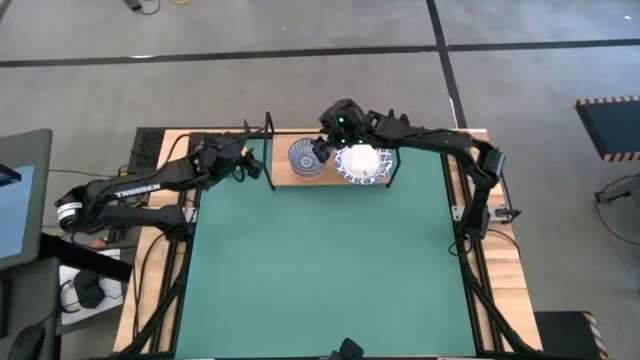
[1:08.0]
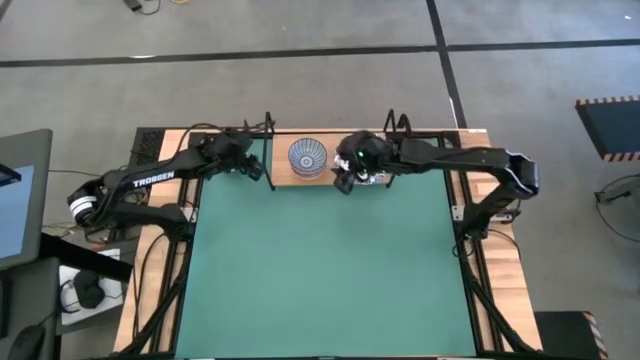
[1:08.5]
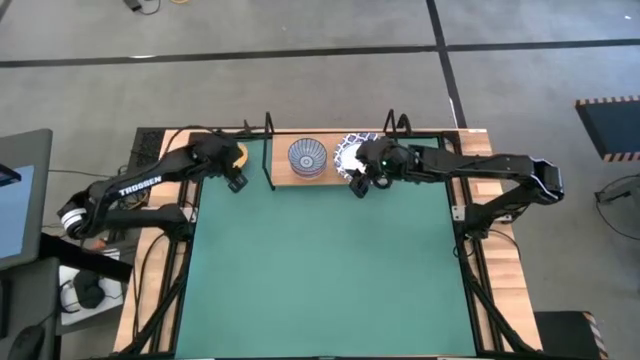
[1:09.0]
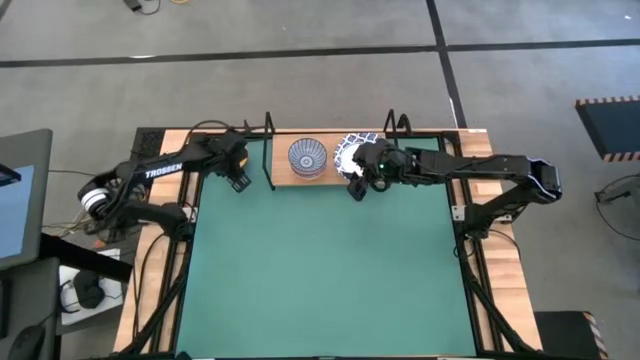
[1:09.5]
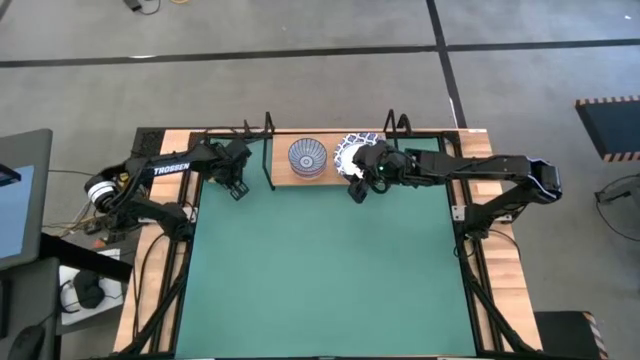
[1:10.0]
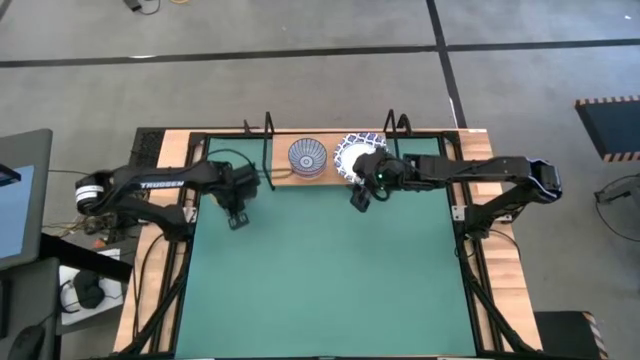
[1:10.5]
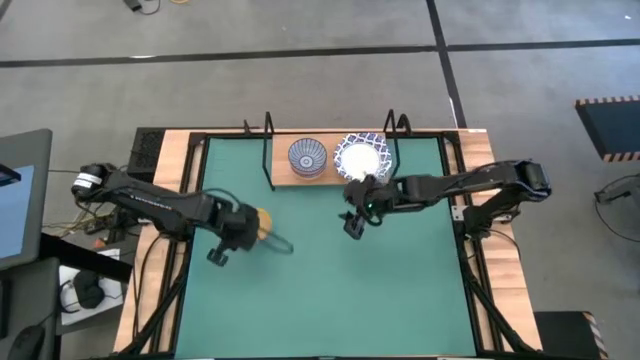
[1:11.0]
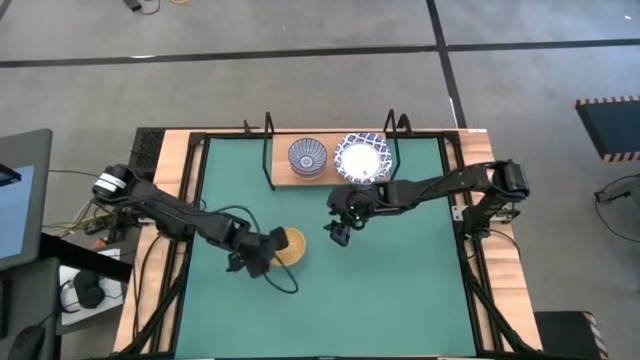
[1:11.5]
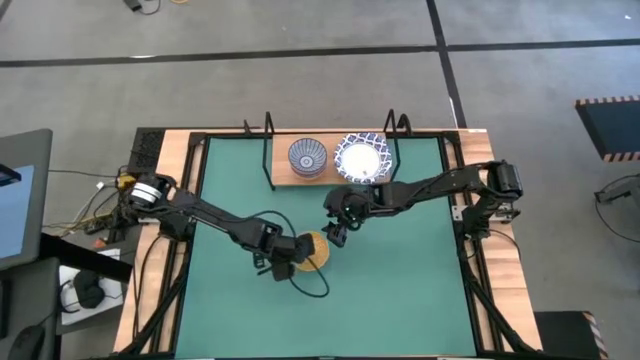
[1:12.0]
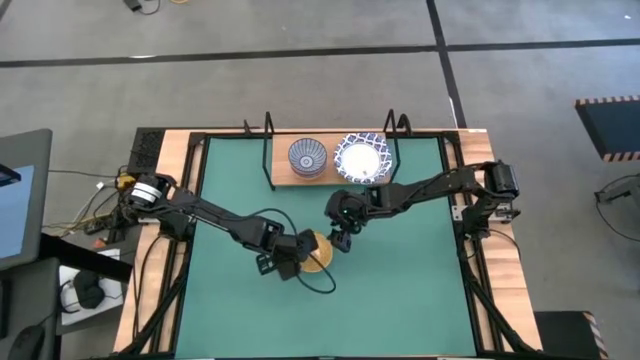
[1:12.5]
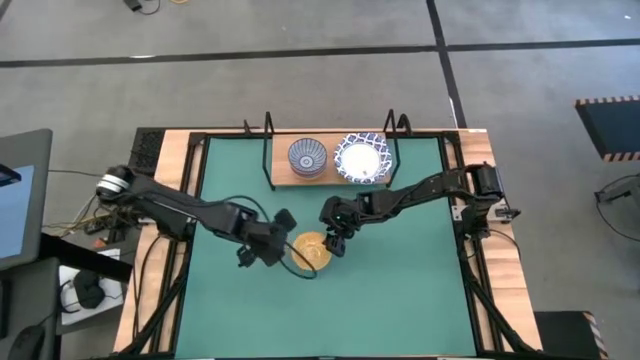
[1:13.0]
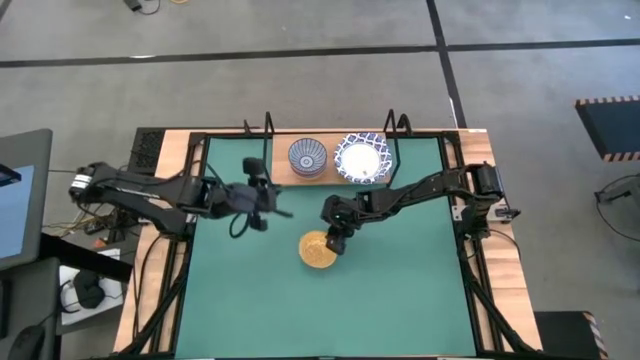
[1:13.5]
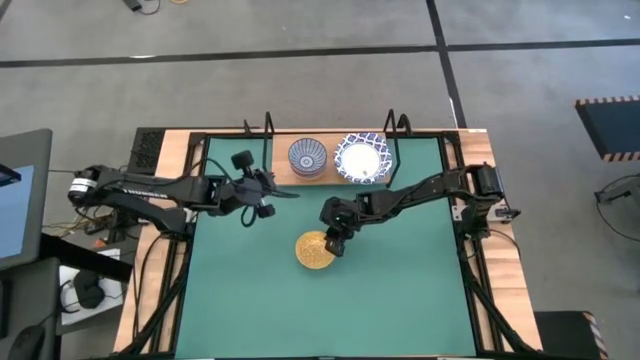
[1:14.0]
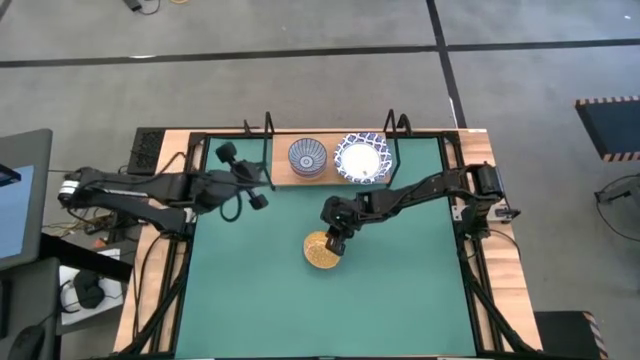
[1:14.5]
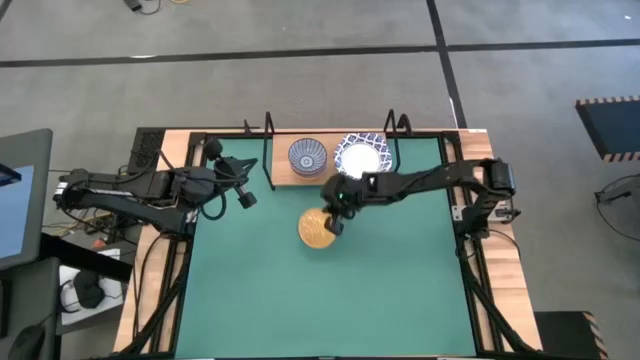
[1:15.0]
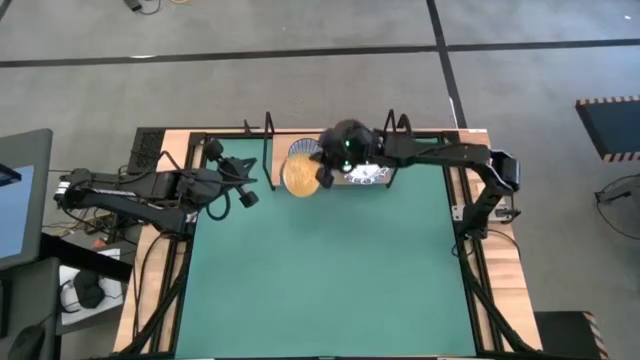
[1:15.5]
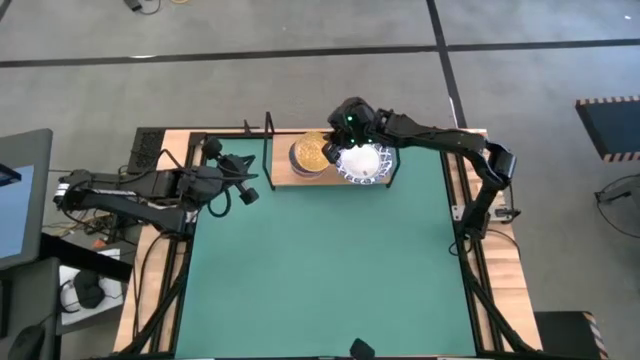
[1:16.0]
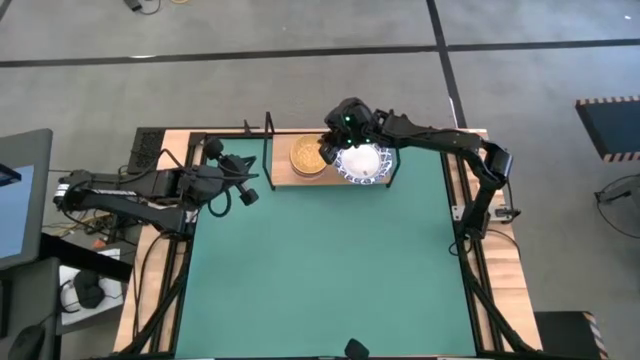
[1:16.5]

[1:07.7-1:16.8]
Task: Place and stack bowls onto a shelf
Stack the yellow patterned bowl on top of the blue striped bowl on the shelf

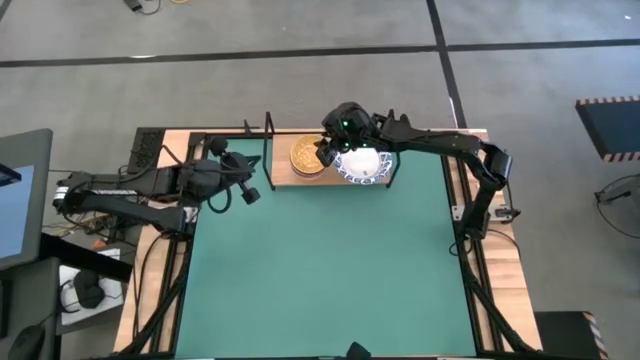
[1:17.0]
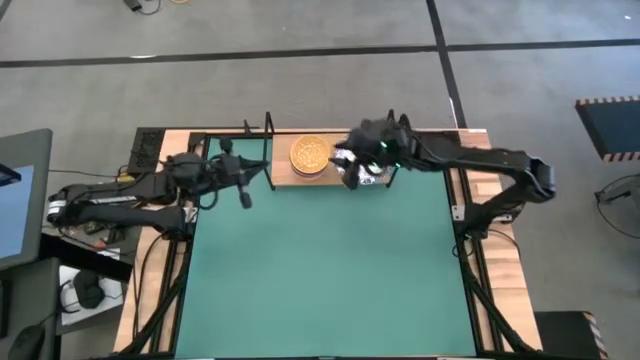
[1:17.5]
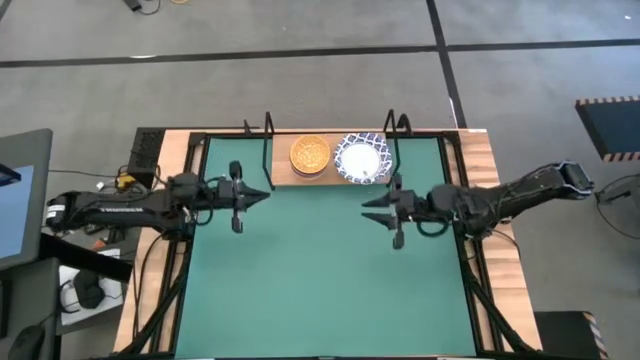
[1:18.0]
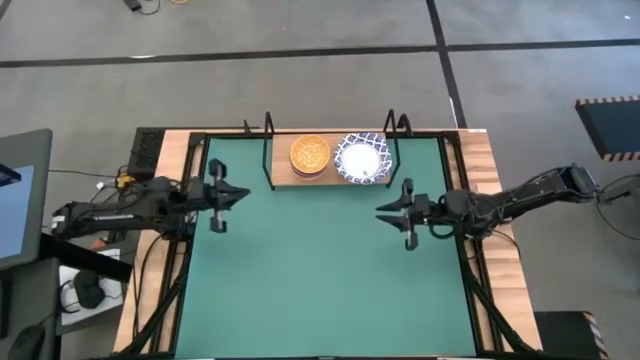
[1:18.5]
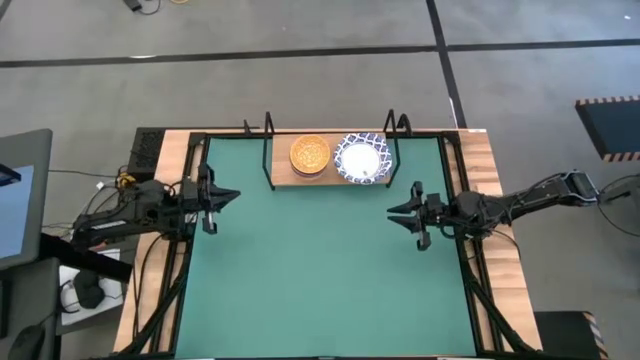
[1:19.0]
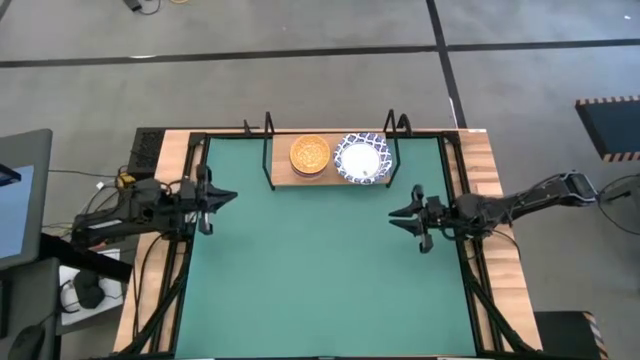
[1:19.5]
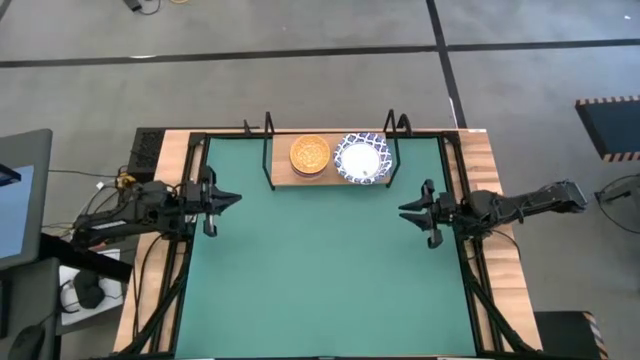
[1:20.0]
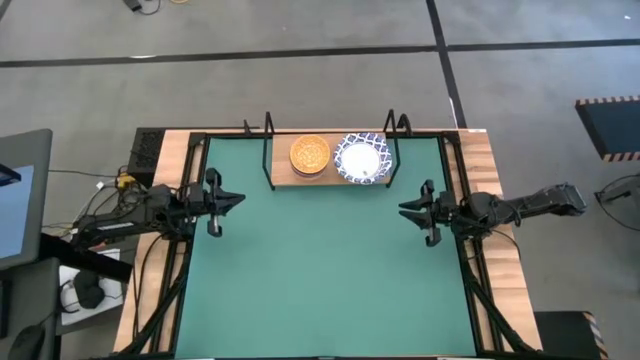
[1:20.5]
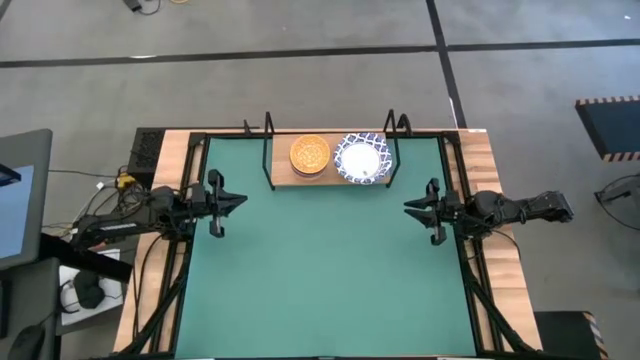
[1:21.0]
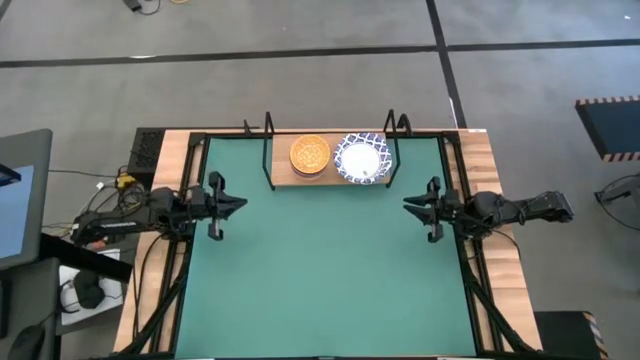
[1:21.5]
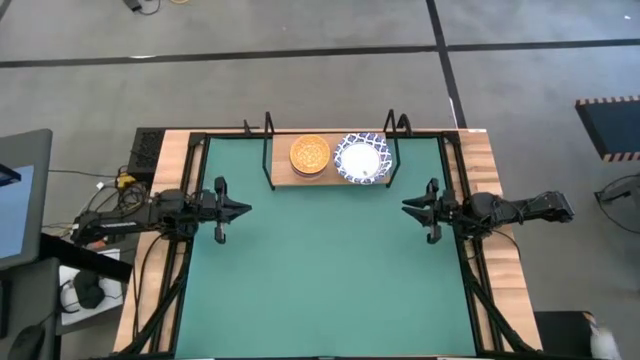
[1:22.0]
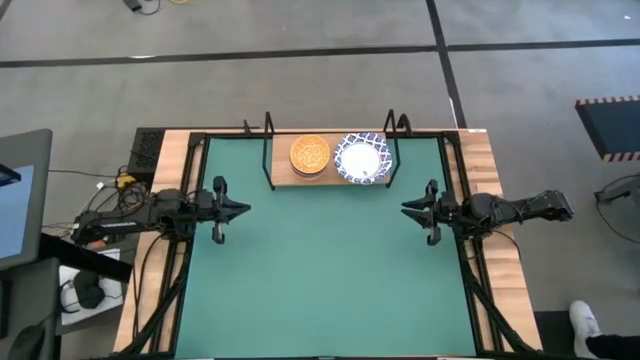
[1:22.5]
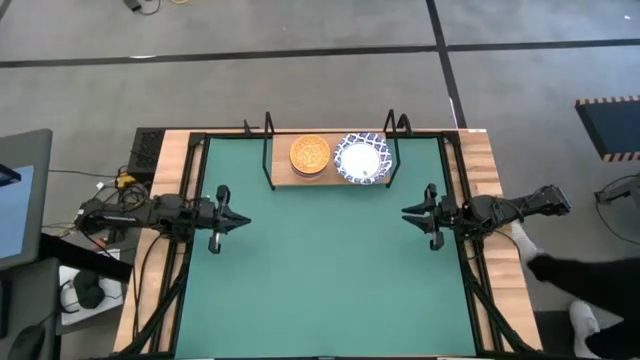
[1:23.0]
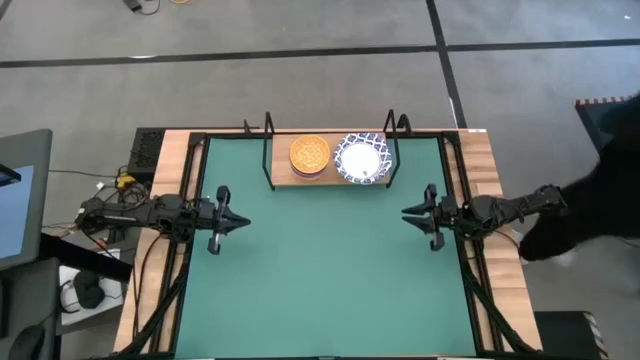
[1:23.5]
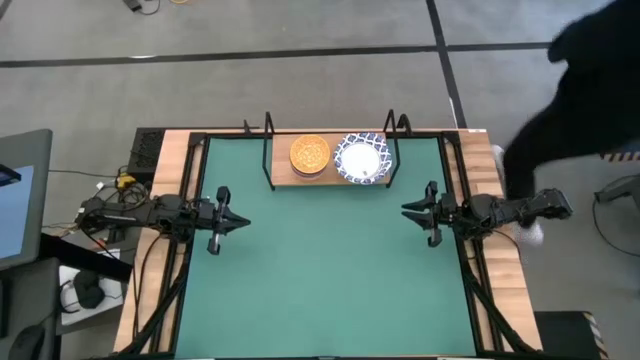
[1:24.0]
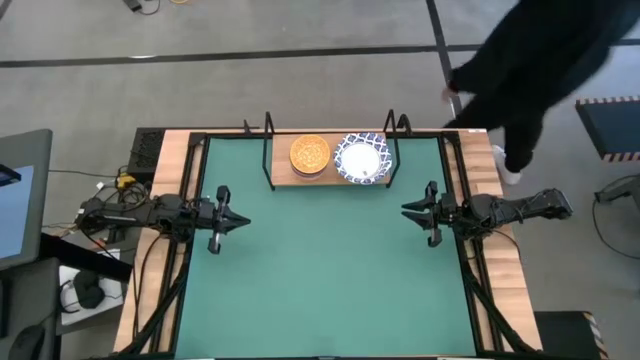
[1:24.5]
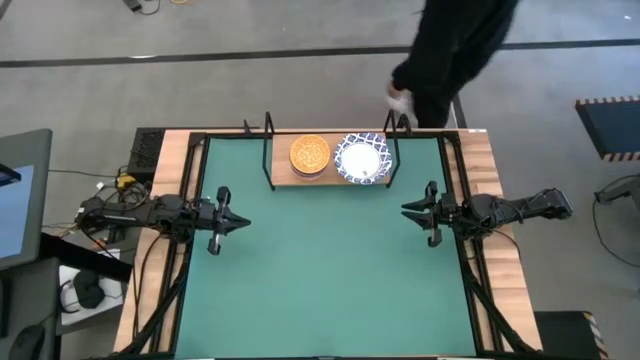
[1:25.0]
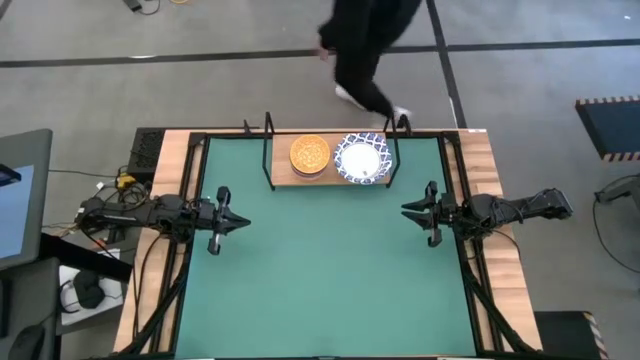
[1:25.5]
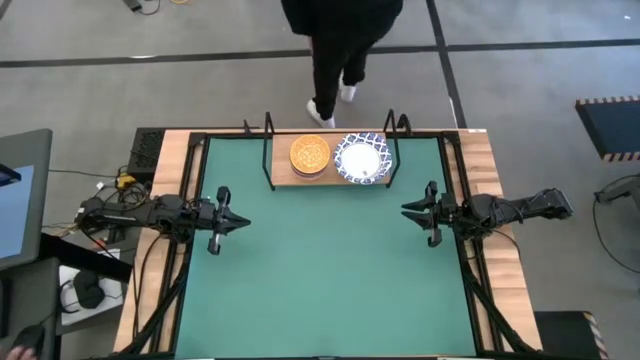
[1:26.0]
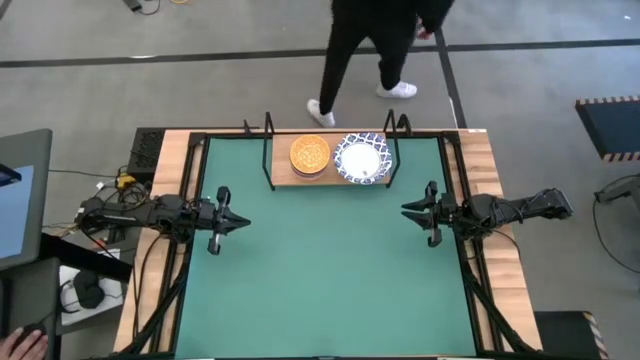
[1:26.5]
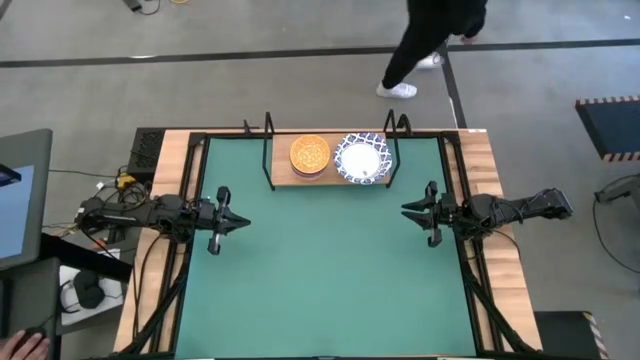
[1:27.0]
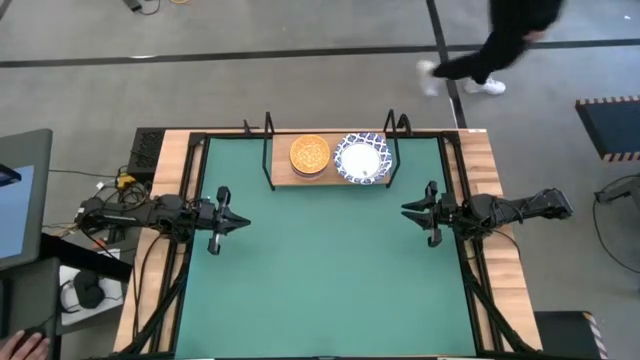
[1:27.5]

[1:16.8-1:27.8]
Return to Home Position

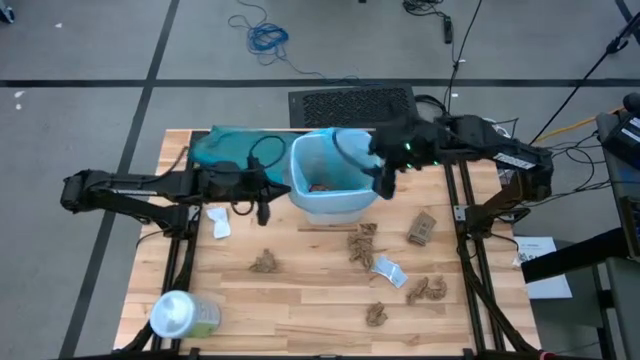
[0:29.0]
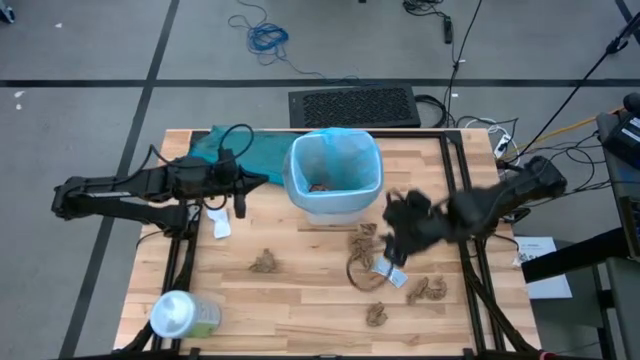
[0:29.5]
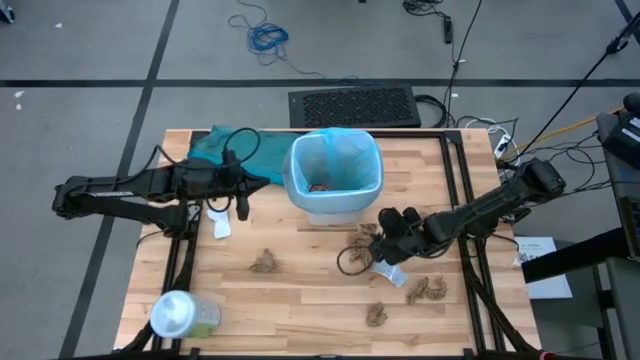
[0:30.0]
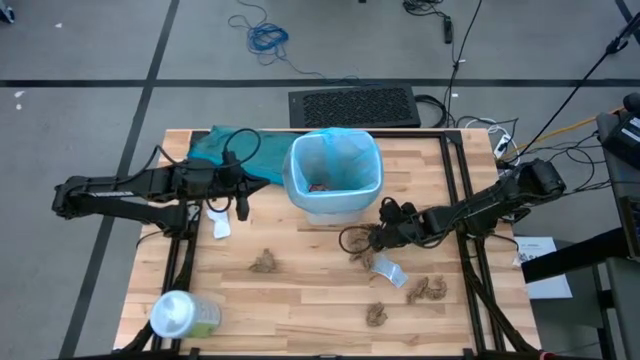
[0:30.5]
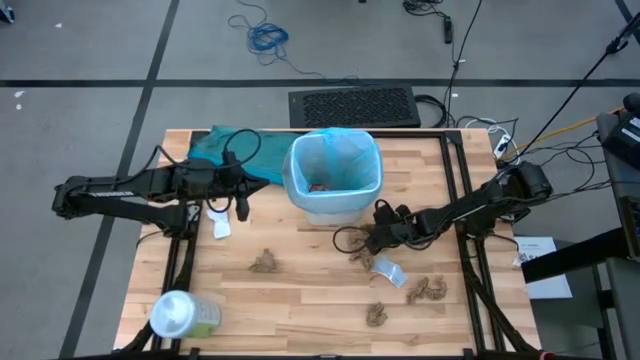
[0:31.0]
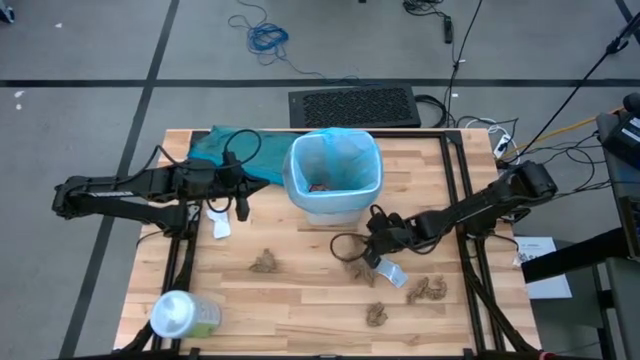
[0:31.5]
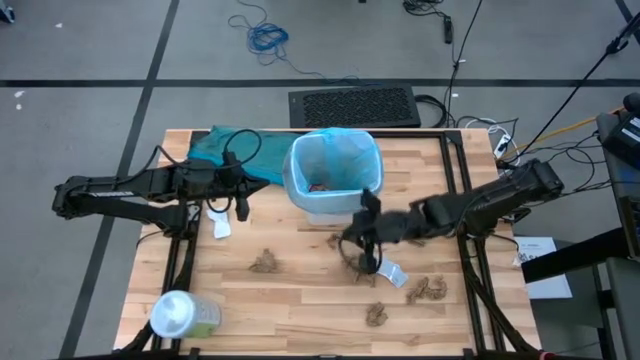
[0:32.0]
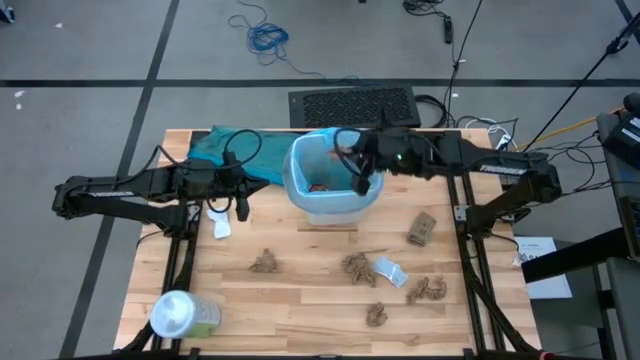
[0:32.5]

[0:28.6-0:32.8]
Task: place trash/remove bag and relplace
Put the brown napkin into the trash bin
